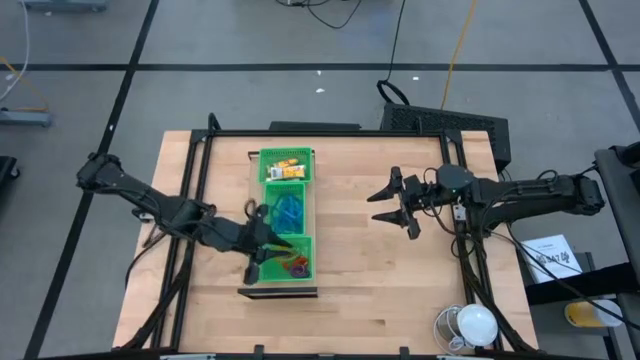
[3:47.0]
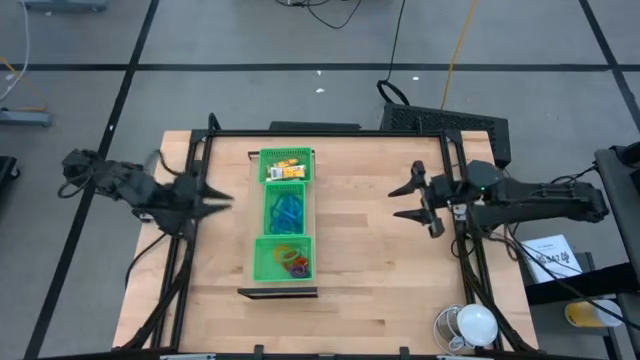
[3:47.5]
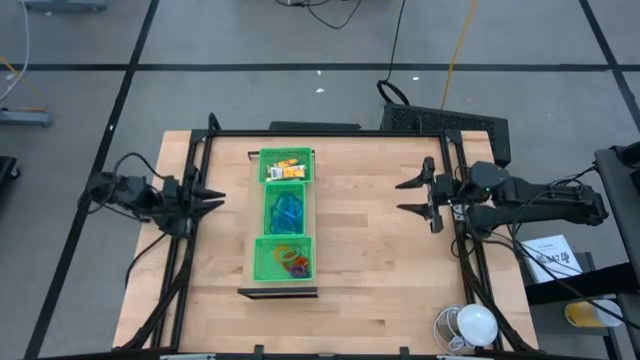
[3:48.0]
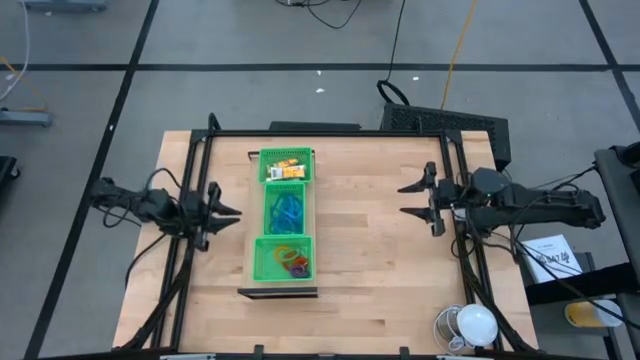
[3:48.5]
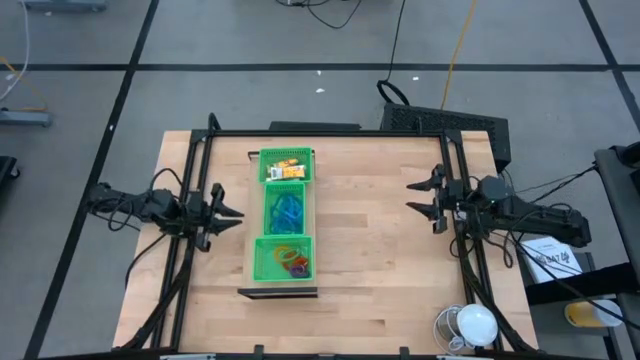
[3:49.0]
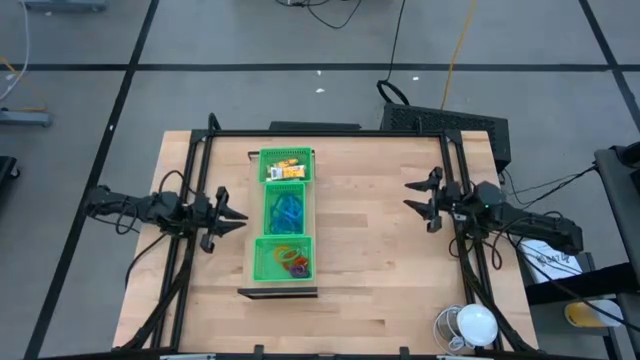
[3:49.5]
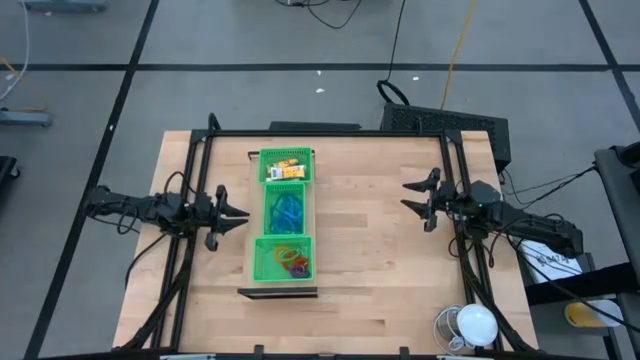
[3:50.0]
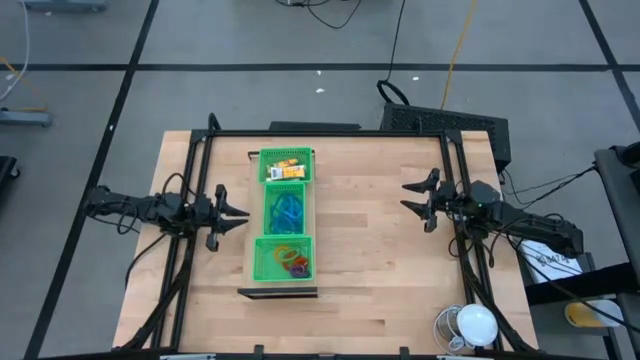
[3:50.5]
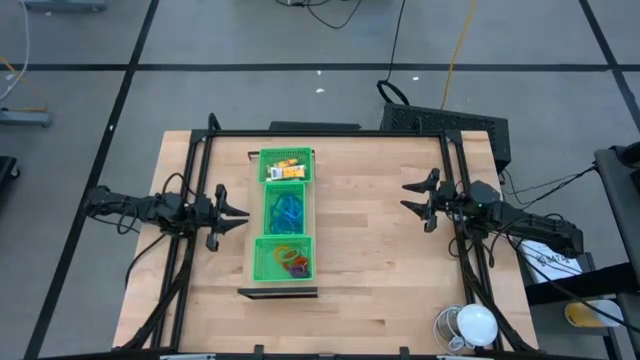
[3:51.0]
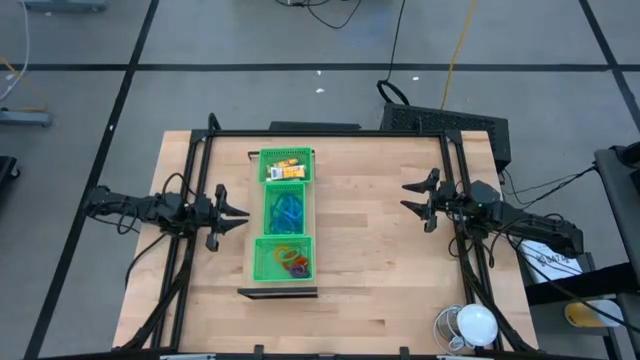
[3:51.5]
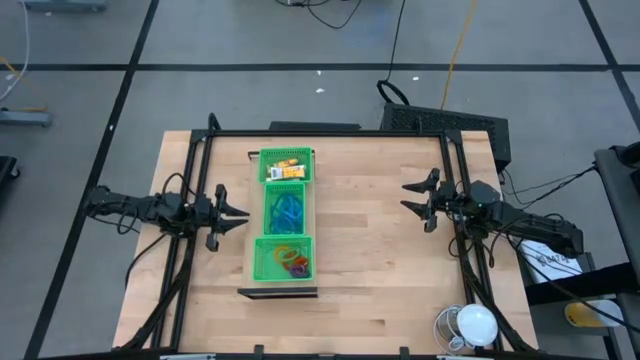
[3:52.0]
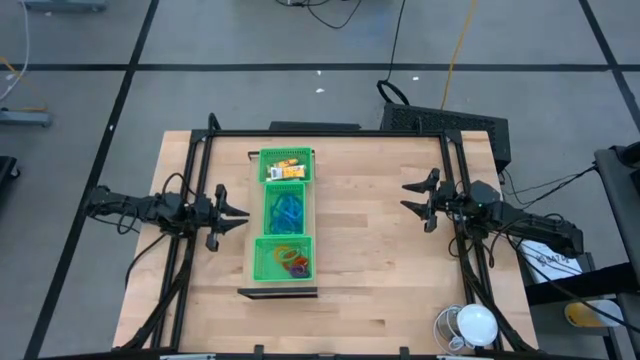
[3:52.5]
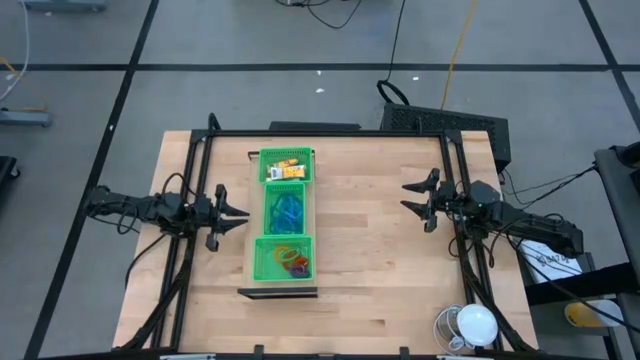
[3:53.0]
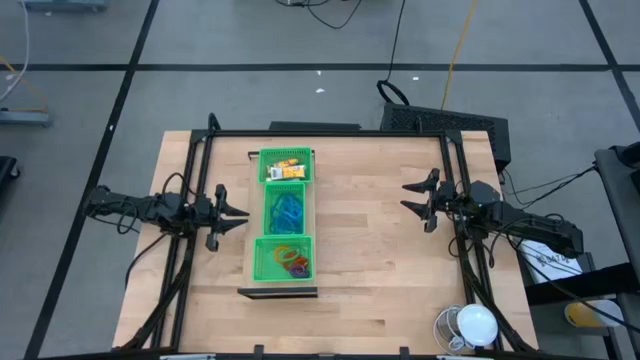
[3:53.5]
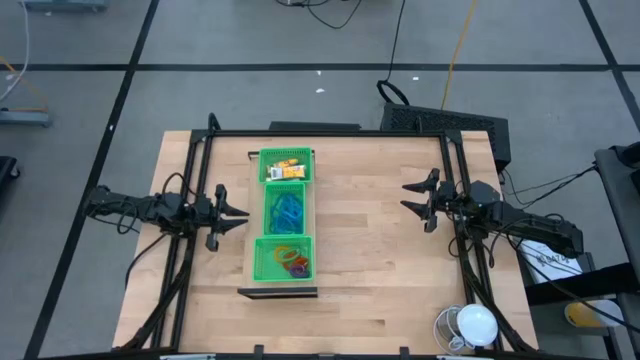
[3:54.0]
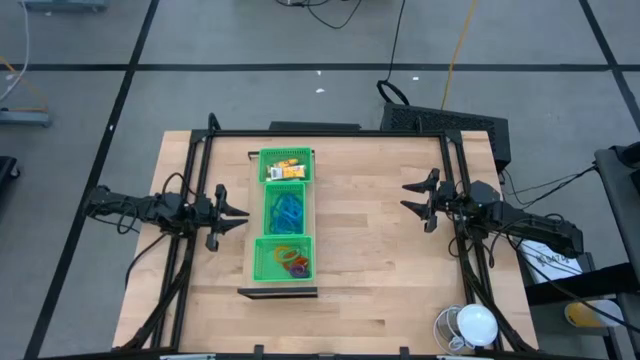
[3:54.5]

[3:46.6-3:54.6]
Task: Pick & Place Office Desk Supplies
Return to Home Position

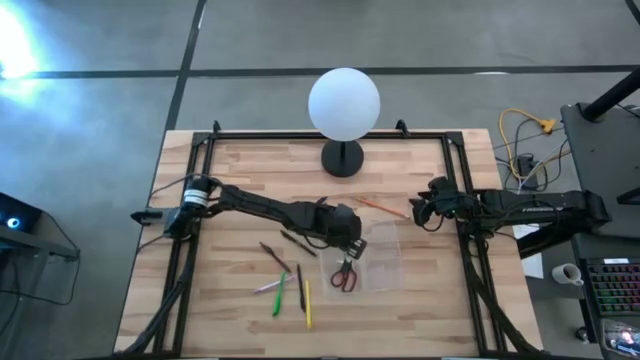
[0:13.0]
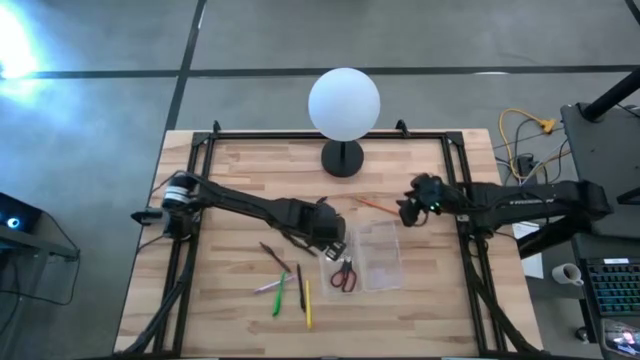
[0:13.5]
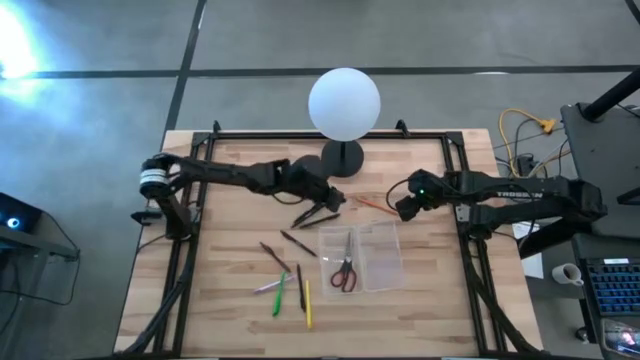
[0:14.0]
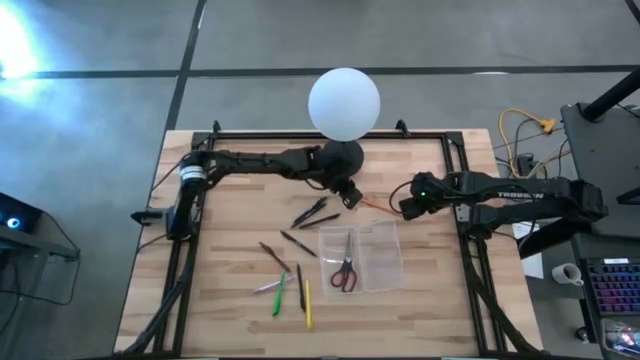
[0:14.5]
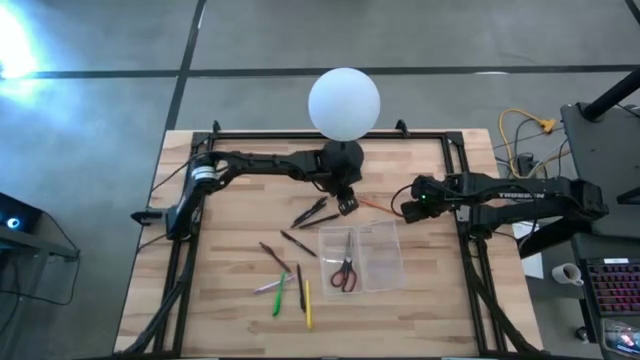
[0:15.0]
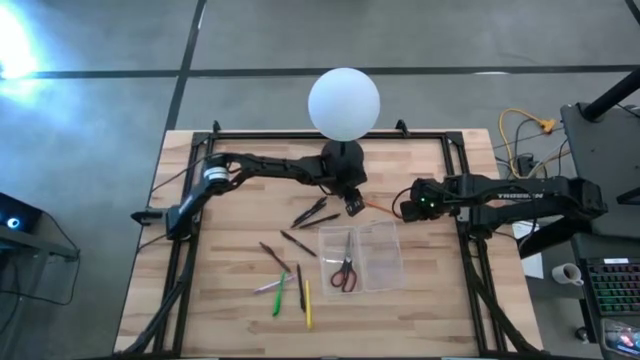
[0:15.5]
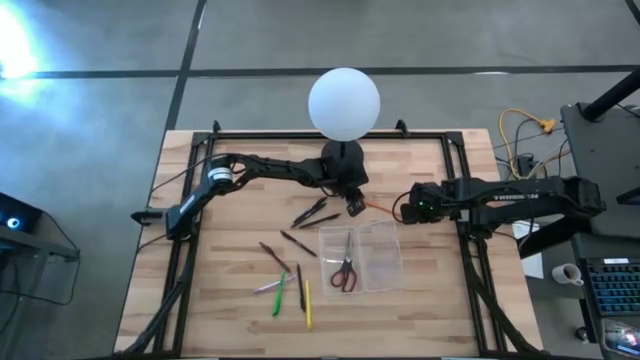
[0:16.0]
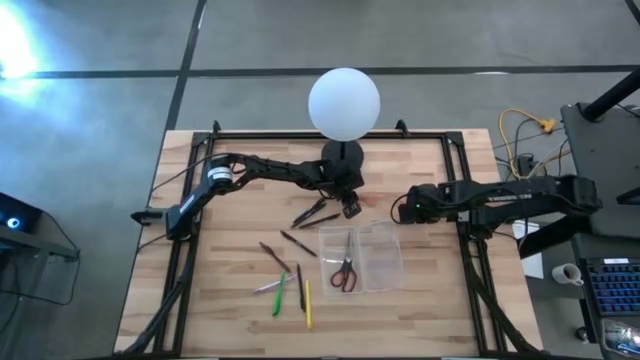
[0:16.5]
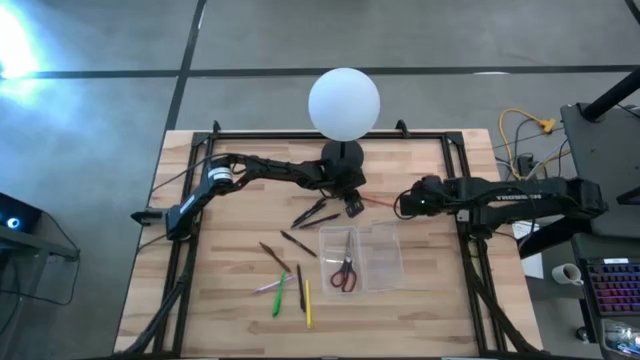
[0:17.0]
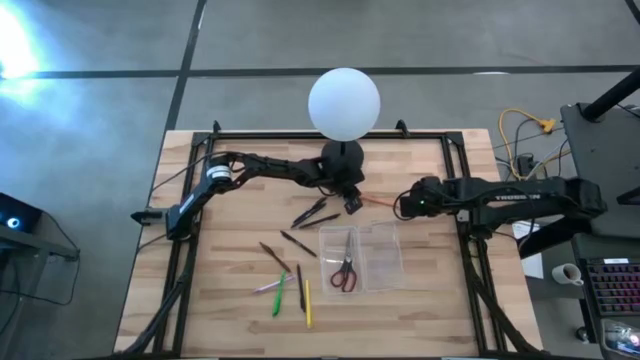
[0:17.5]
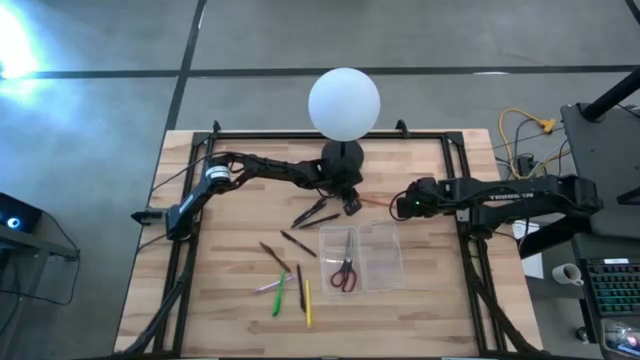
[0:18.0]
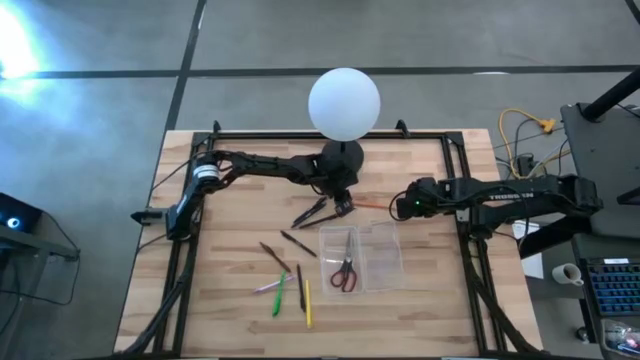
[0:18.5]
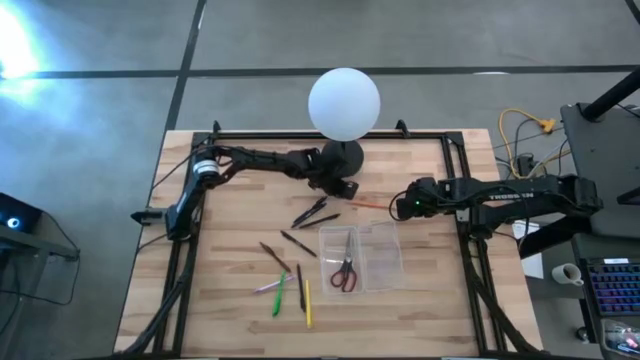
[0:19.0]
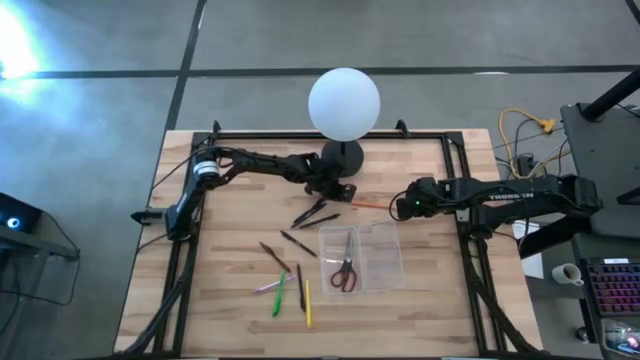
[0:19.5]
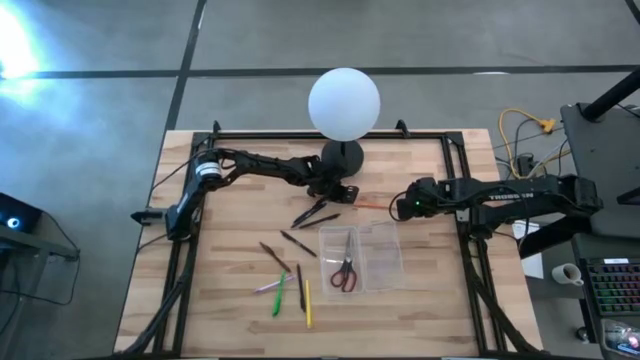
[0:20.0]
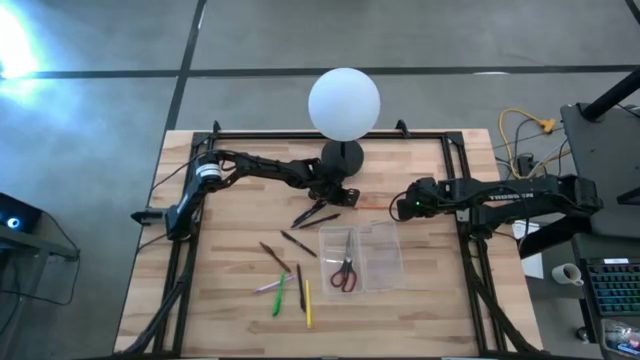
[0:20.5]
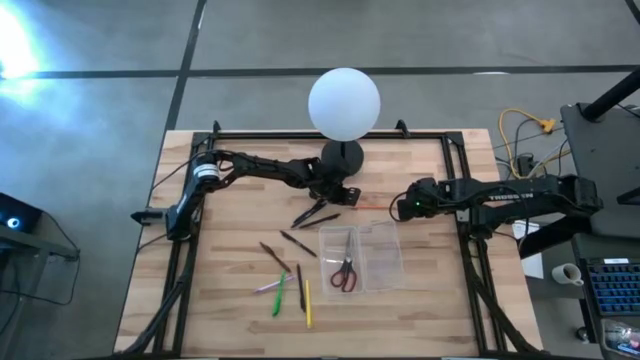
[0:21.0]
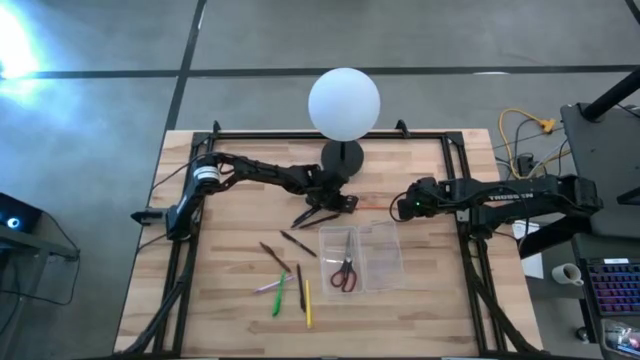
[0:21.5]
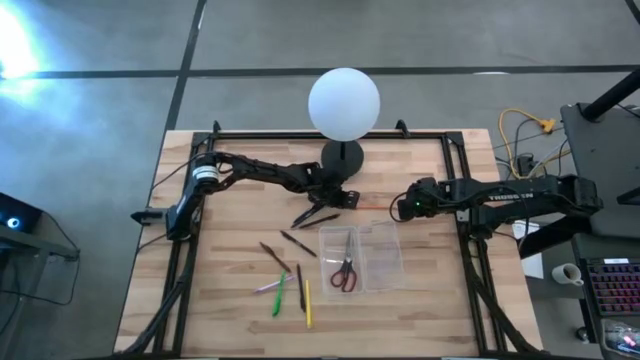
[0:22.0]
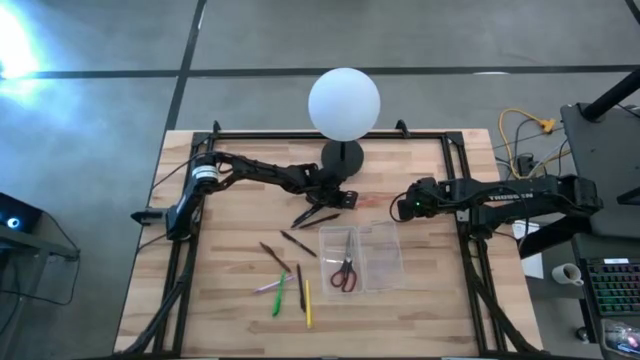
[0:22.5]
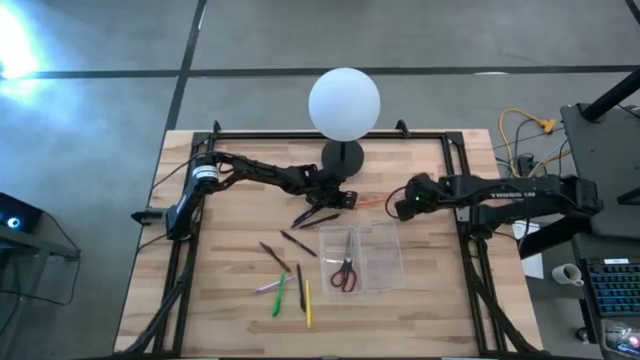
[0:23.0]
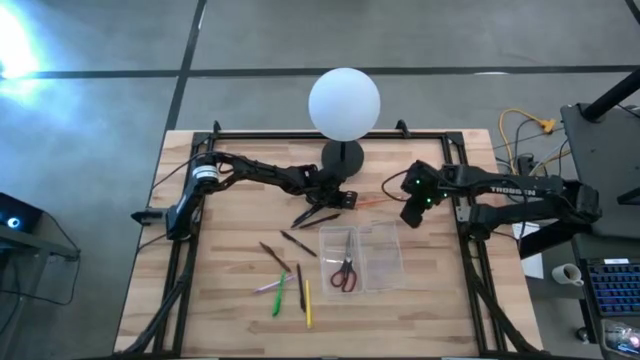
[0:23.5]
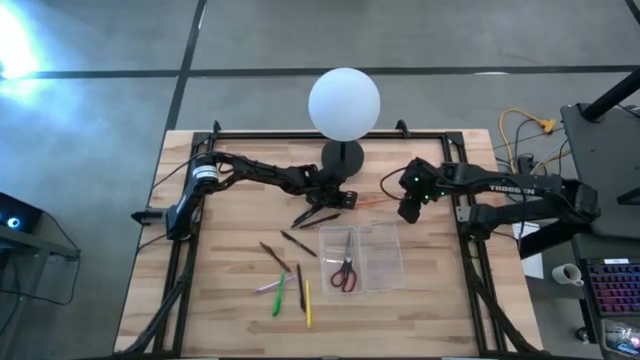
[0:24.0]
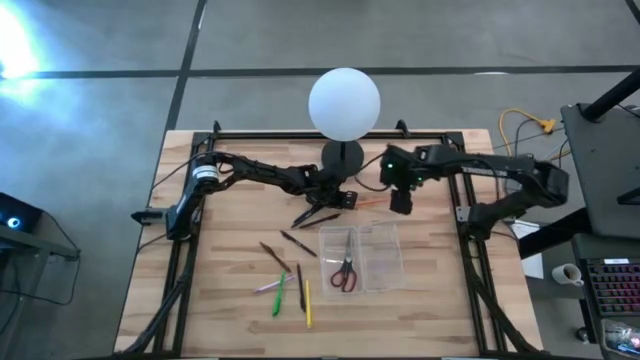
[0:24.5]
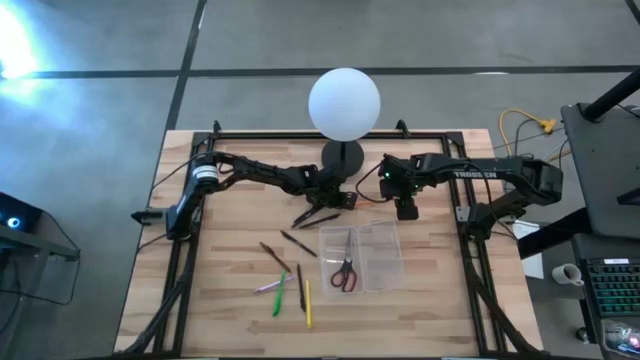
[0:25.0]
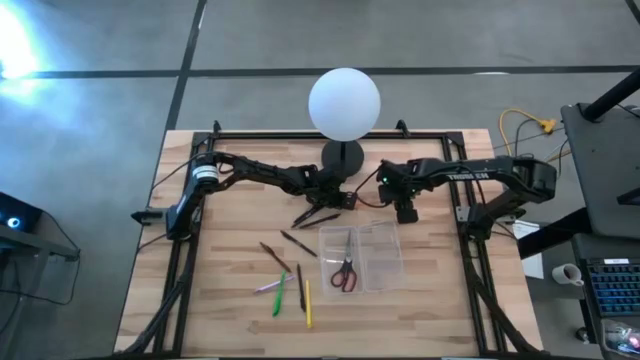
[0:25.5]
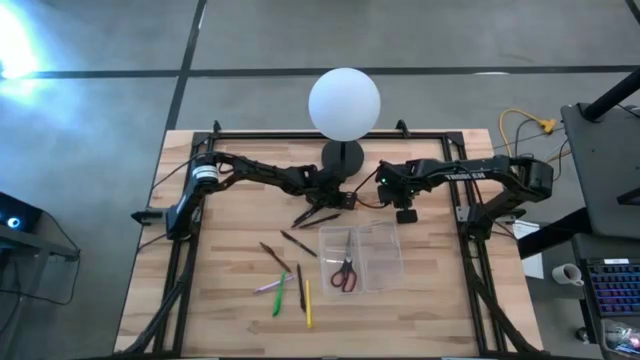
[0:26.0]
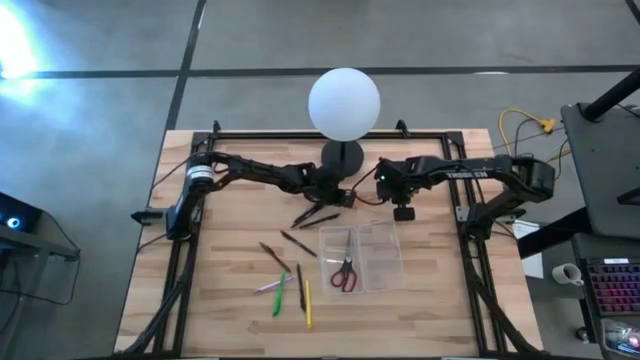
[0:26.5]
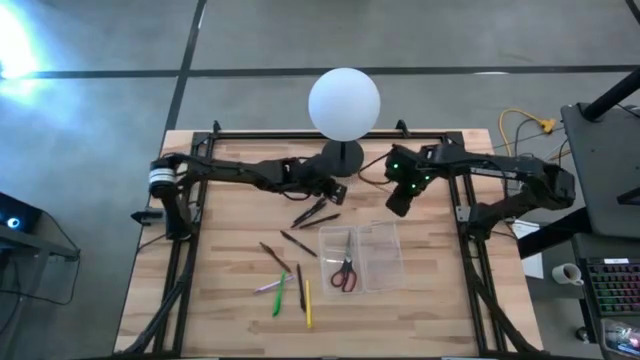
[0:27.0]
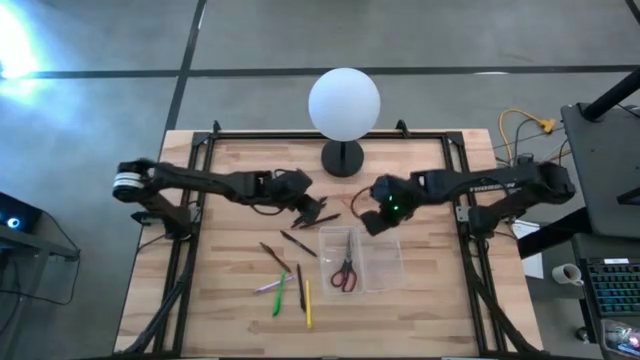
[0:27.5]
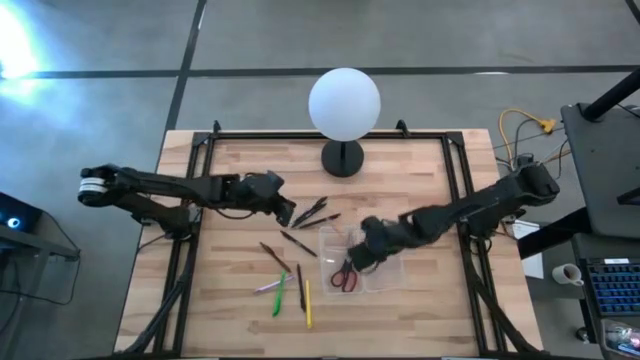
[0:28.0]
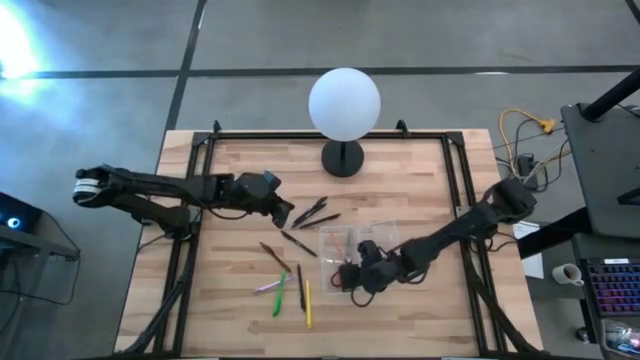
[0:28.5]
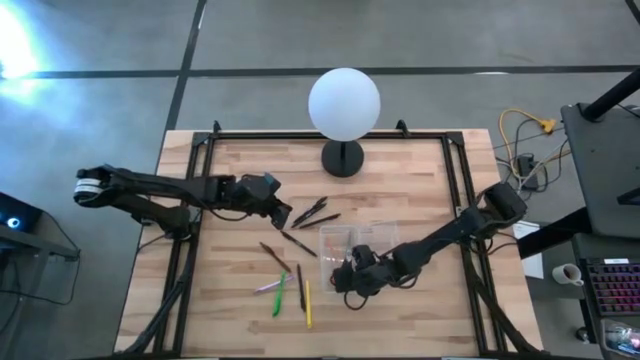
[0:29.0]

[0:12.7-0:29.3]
Task: Pick & place school supplies into a supply box
Put the orange pencil into the transparent supply box
